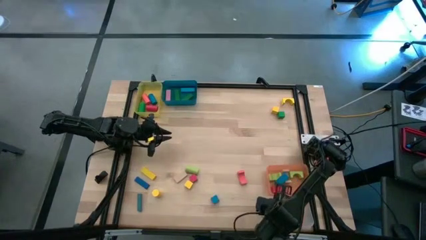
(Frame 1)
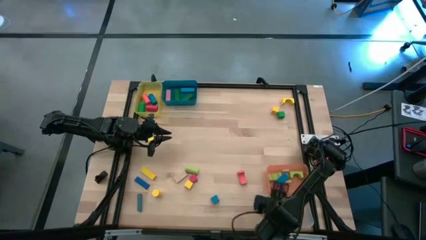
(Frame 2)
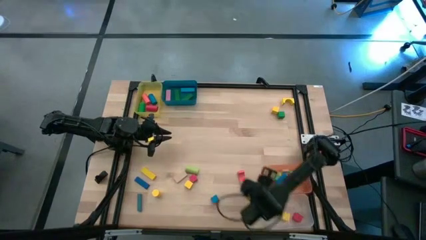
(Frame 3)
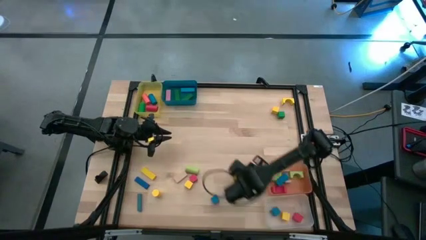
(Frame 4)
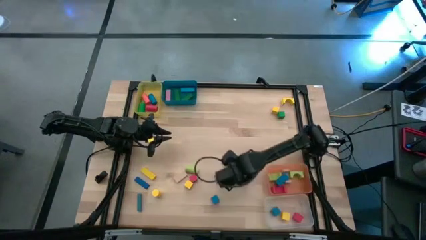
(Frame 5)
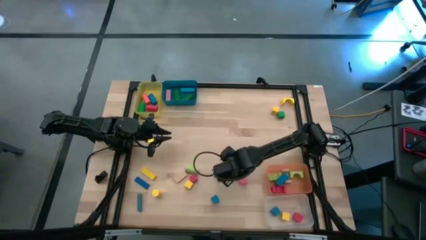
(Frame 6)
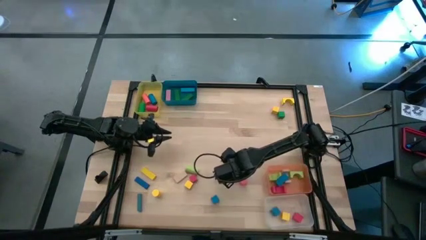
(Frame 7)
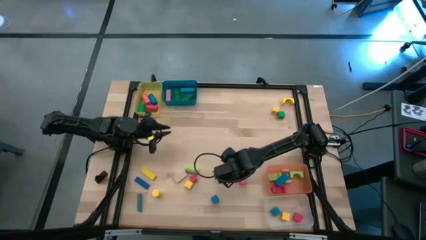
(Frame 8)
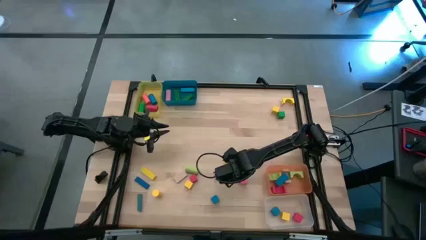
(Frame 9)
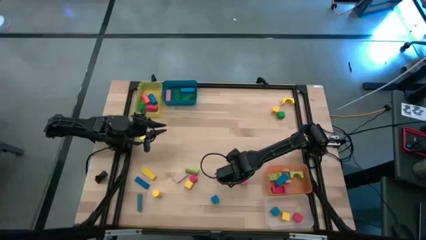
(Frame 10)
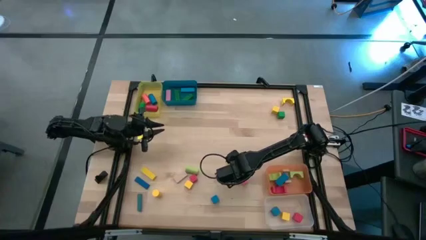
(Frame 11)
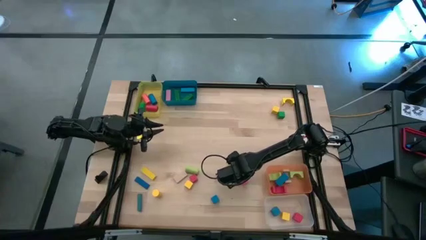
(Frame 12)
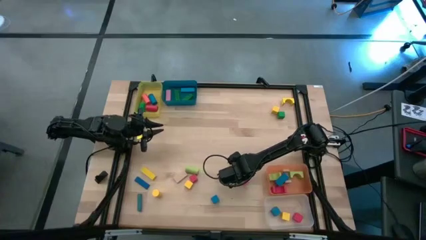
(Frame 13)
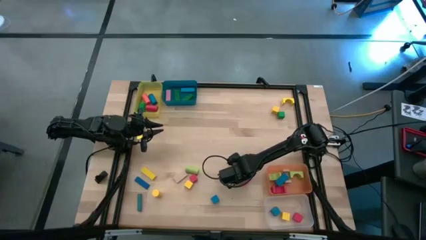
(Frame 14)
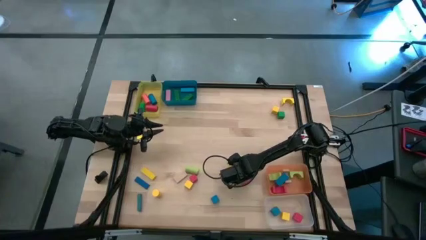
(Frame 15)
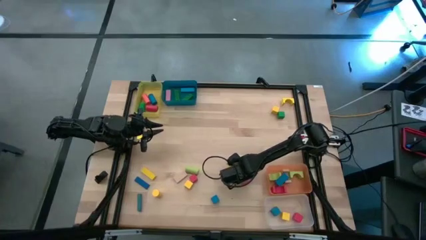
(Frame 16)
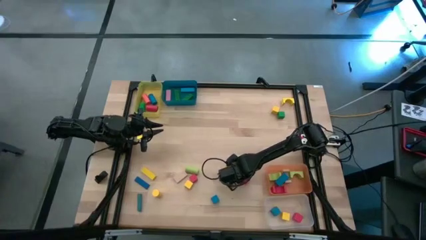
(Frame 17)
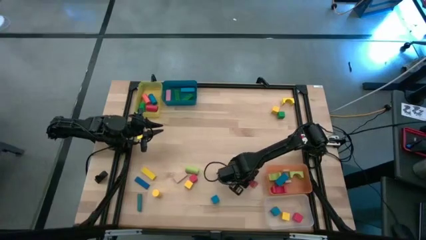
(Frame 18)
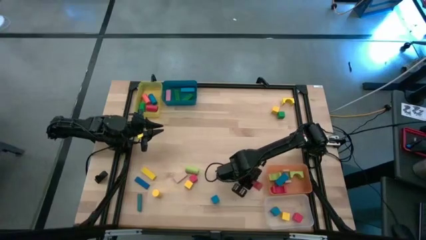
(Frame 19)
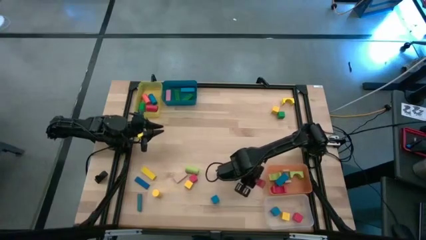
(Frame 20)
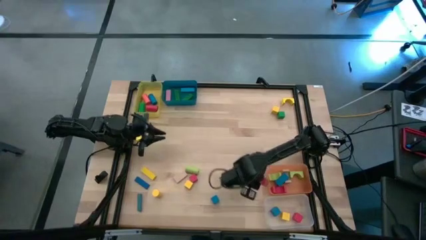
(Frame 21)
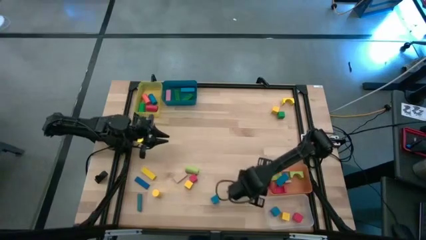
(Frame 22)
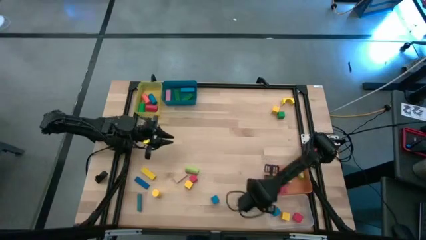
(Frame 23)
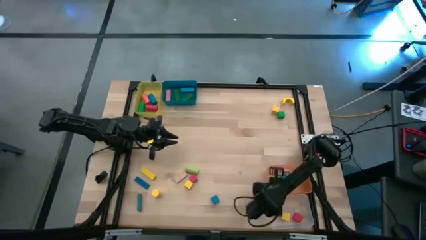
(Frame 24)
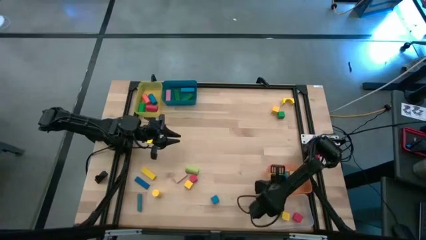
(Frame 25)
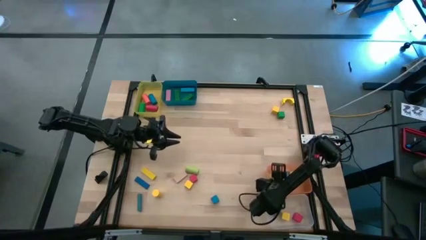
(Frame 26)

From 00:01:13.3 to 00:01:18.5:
Task: Sort blocks by size
Put the orange arch block into the orange bin

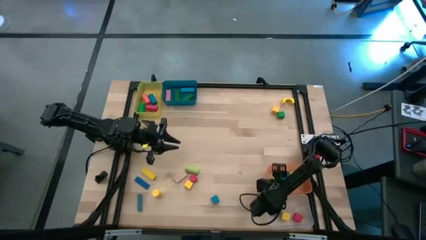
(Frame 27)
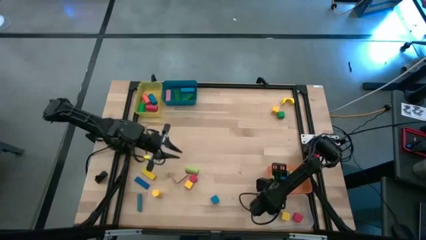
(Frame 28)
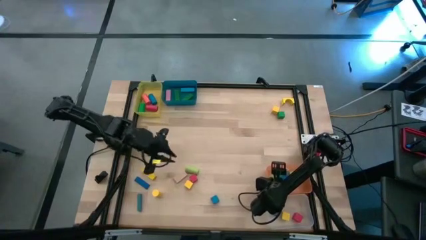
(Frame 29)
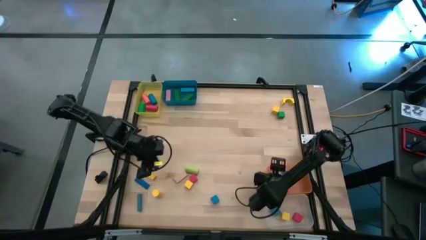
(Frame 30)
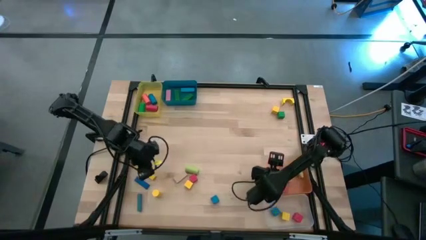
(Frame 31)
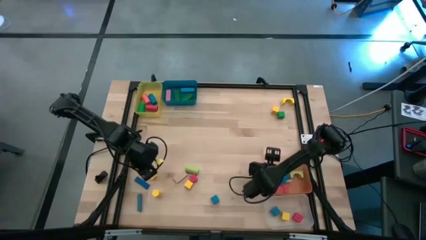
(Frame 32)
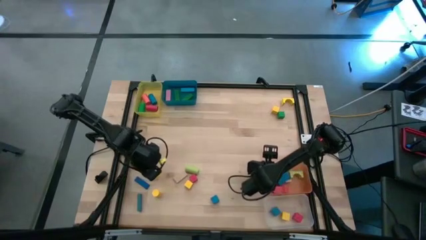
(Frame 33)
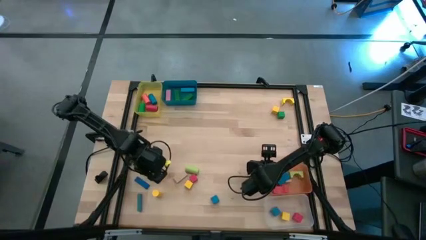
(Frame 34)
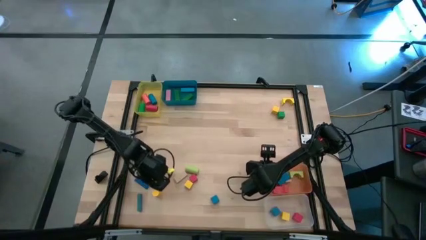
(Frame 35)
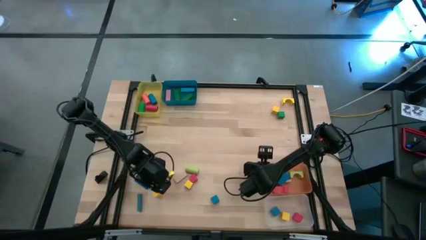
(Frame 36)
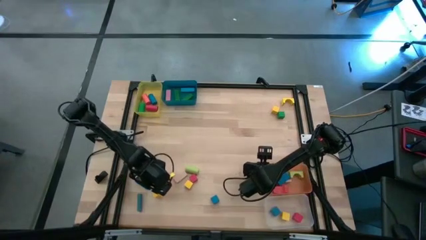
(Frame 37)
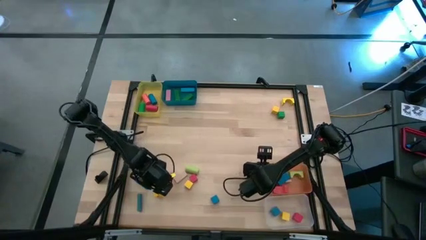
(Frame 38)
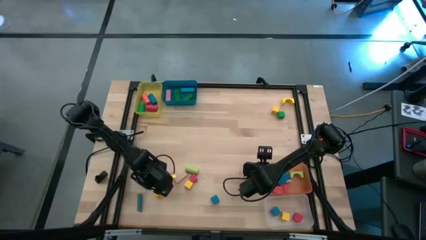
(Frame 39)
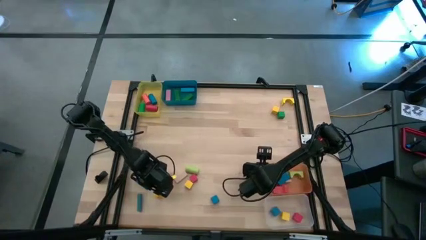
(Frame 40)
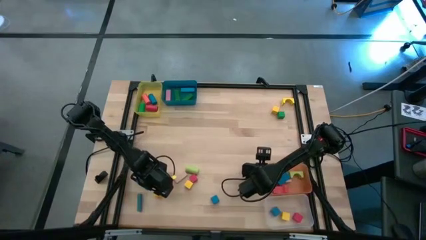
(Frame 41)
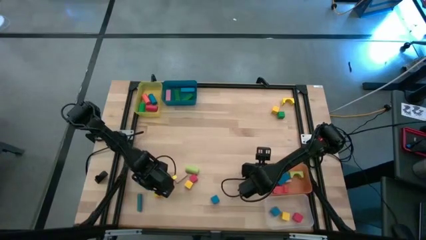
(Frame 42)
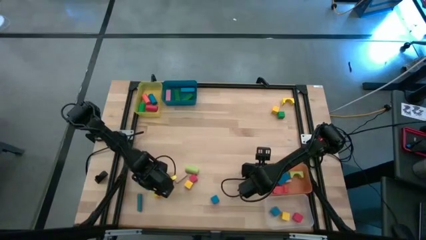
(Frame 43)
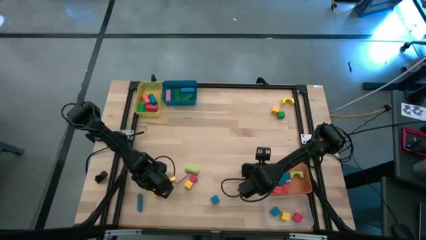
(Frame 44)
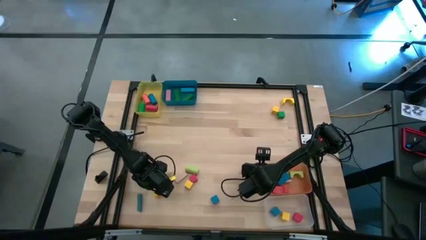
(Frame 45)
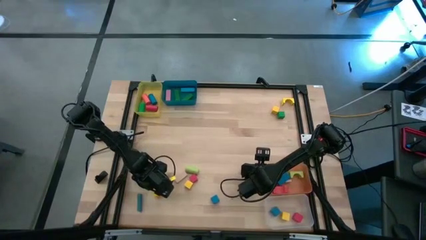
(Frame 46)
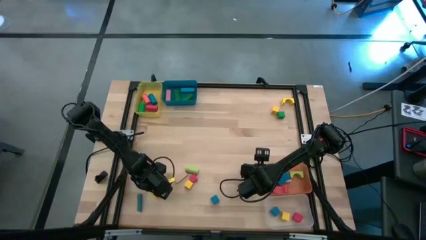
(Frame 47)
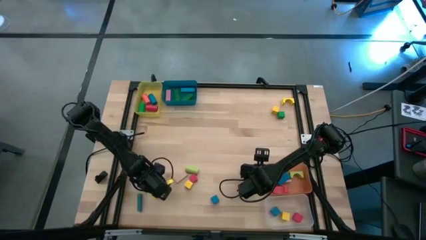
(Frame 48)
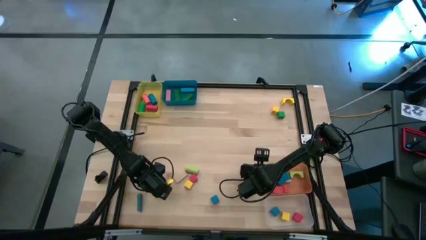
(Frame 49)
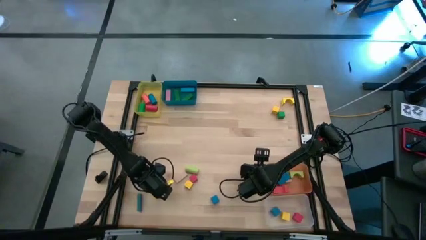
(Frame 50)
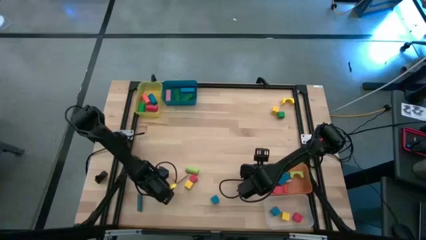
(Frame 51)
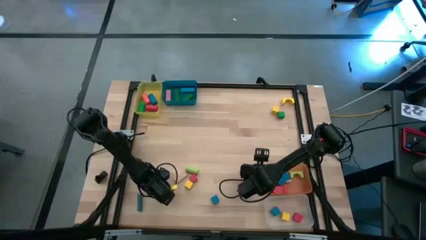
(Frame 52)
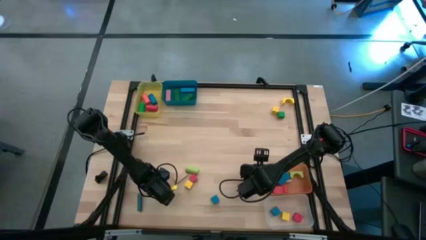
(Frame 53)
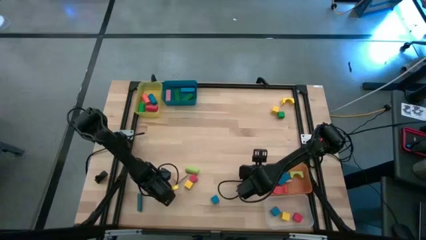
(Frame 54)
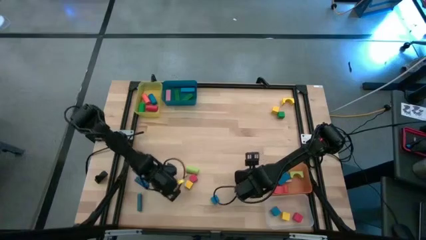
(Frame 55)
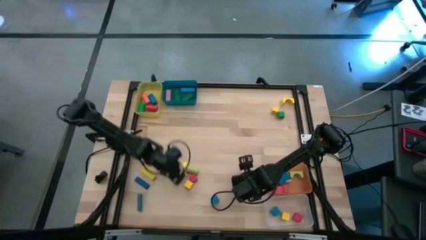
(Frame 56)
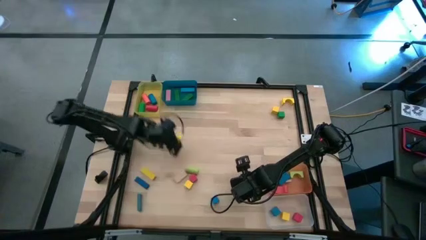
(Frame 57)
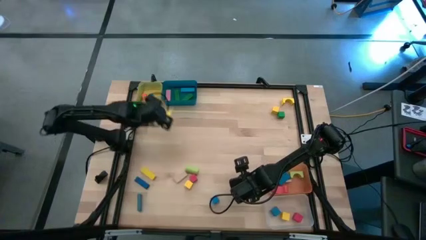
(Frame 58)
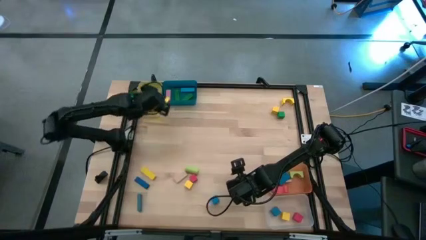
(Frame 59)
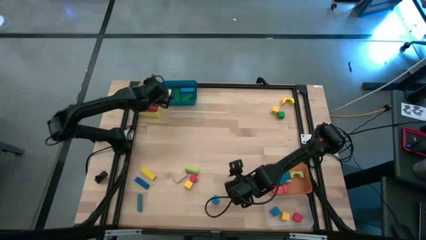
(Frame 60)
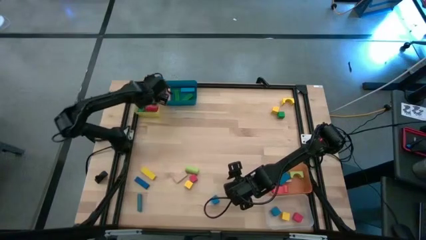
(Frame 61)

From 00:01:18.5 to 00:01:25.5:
Put the yellow cylindrical block into the yellow bin

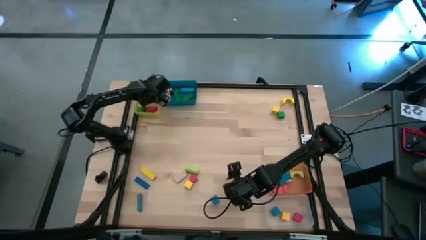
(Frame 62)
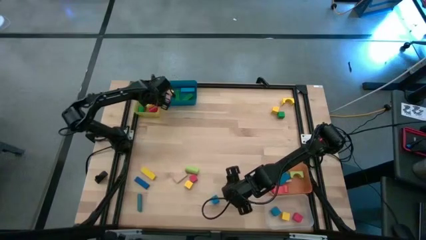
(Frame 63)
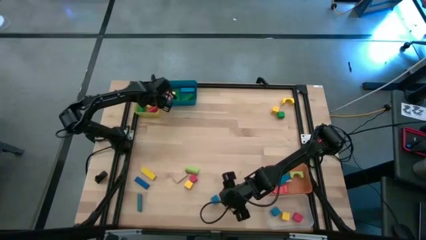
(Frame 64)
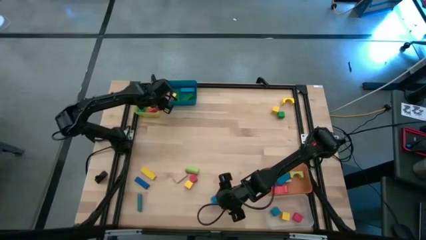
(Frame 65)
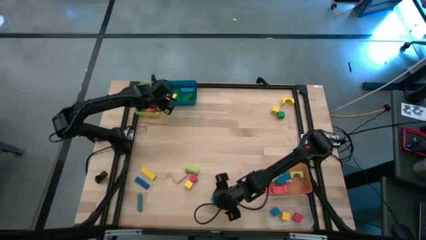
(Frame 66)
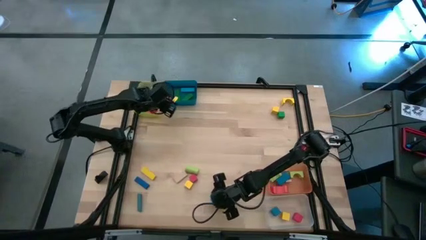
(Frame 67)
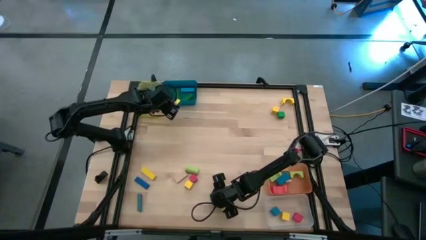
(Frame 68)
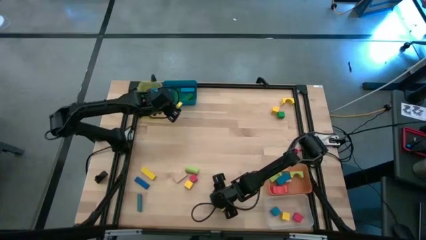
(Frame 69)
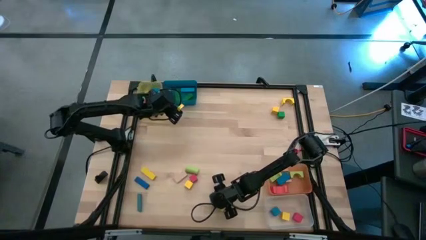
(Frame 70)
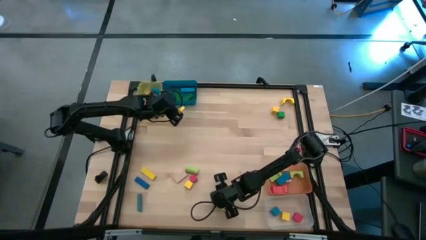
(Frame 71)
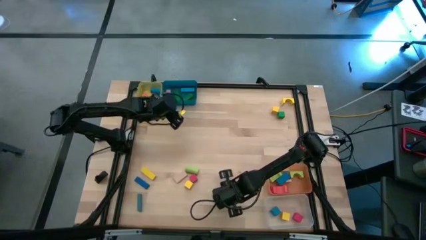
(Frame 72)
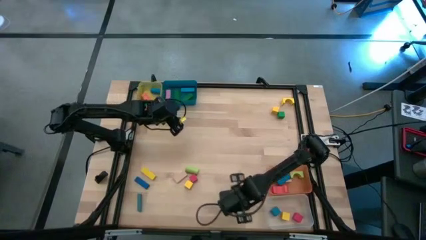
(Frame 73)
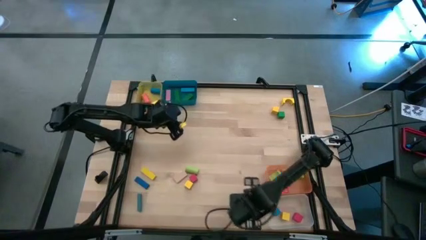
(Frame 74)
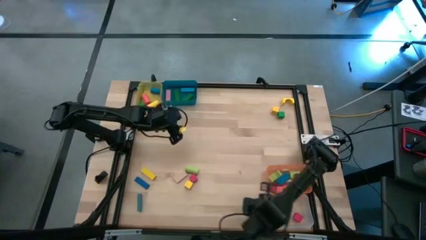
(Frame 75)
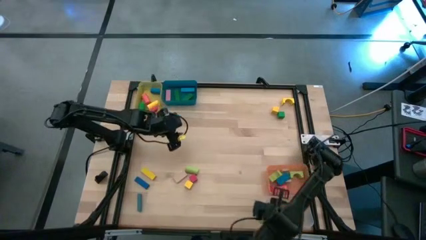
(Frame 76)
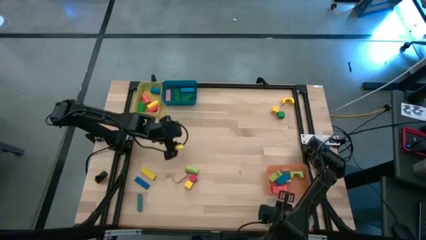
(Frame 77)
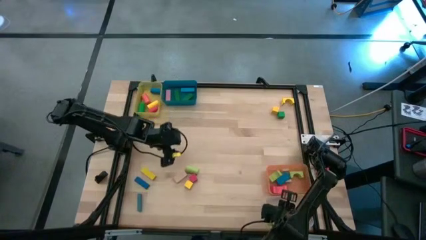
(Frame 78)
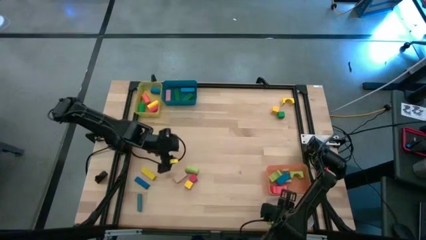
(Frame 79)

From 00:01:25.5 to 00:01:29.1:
Put the blue square block into the transparent bin
